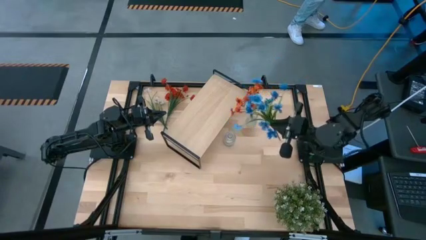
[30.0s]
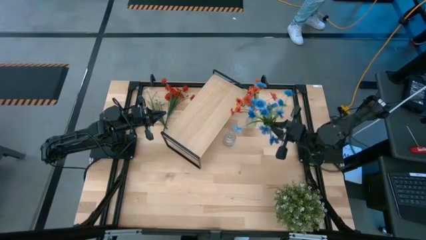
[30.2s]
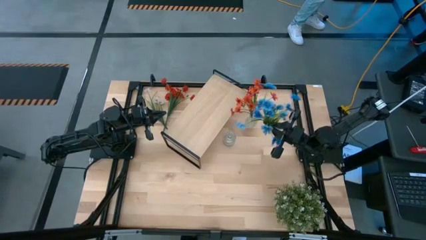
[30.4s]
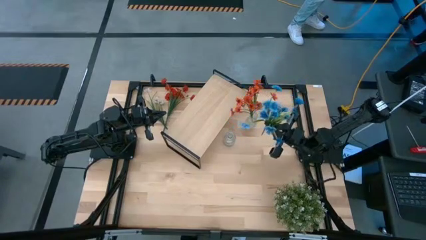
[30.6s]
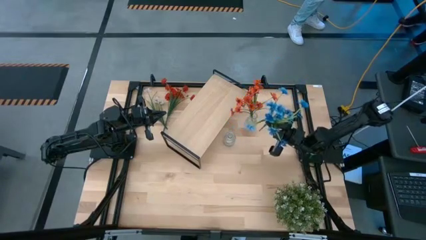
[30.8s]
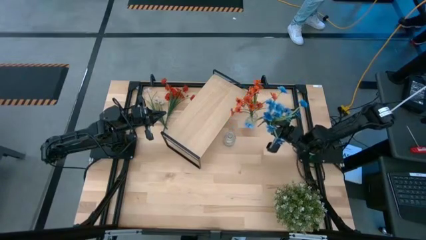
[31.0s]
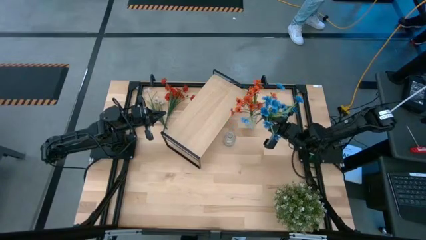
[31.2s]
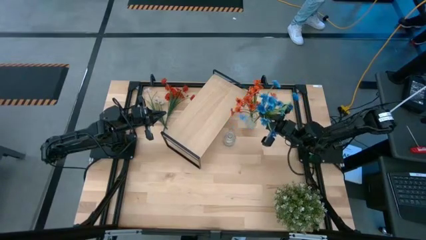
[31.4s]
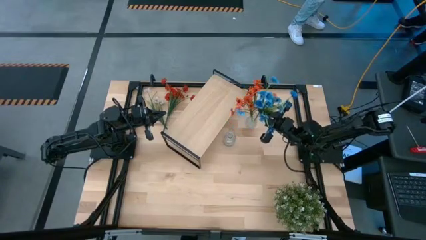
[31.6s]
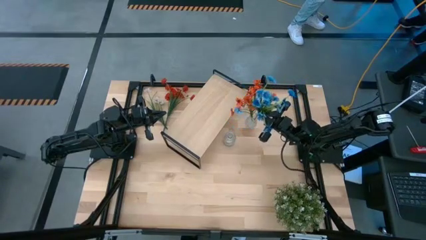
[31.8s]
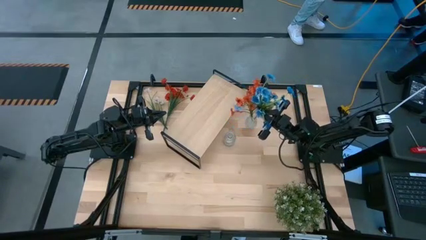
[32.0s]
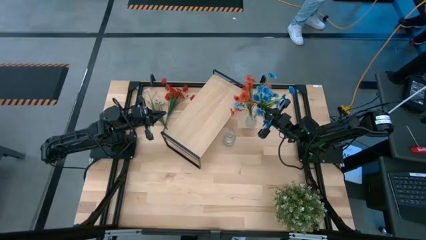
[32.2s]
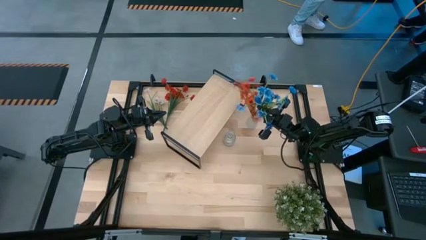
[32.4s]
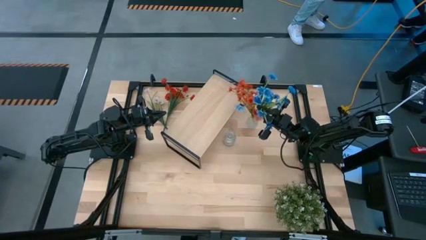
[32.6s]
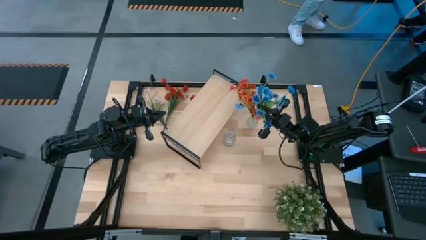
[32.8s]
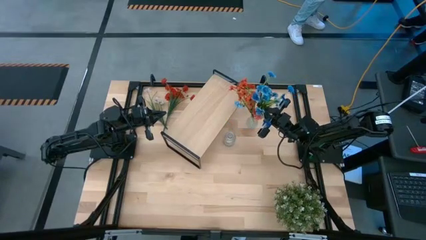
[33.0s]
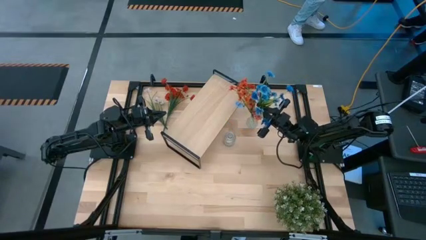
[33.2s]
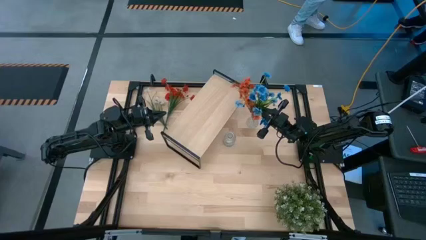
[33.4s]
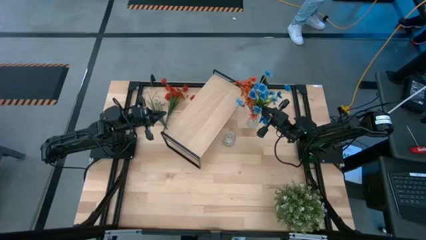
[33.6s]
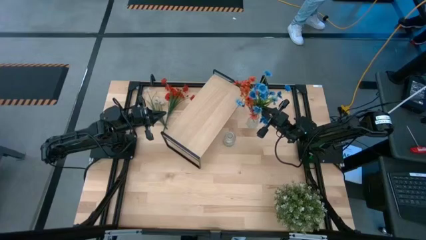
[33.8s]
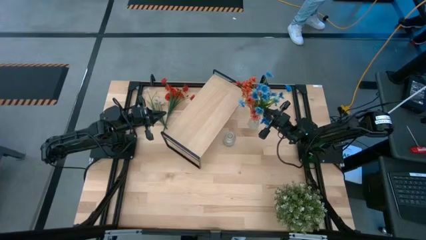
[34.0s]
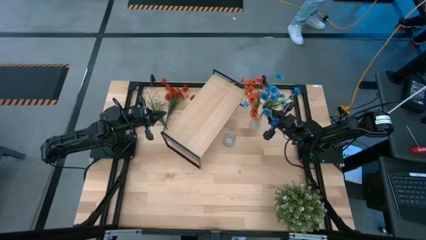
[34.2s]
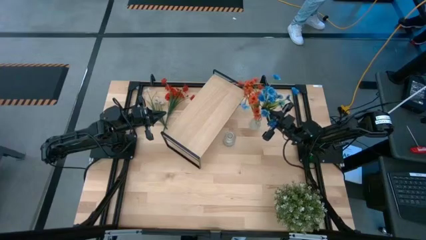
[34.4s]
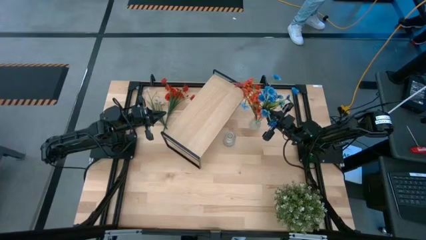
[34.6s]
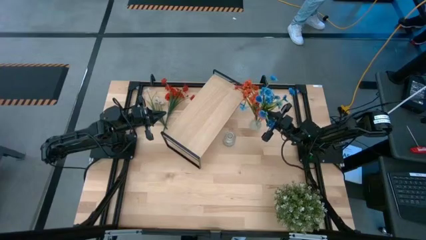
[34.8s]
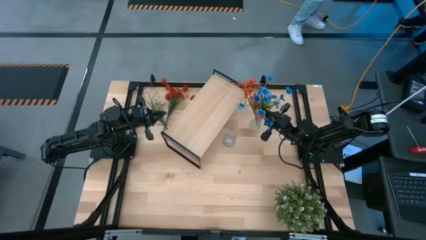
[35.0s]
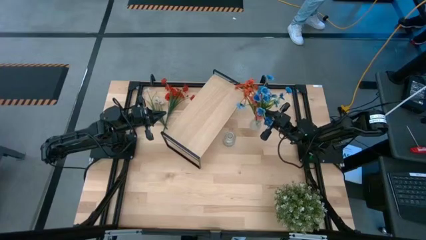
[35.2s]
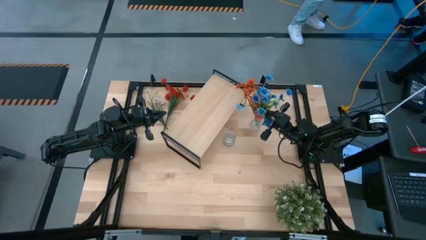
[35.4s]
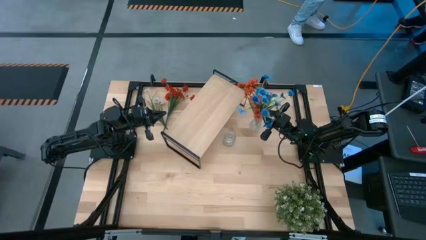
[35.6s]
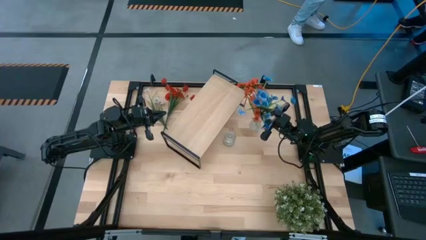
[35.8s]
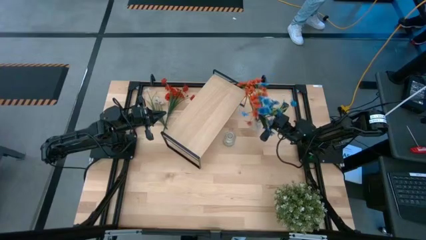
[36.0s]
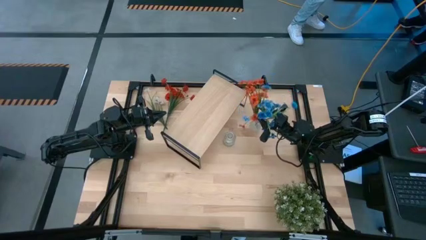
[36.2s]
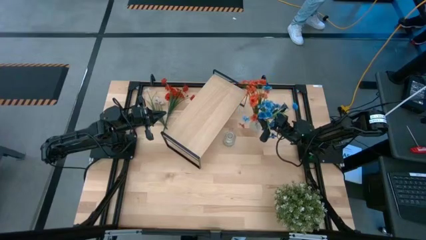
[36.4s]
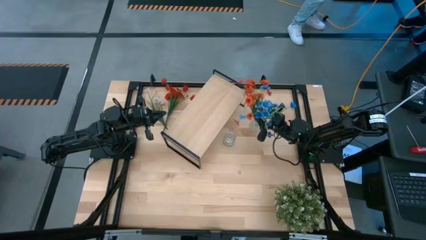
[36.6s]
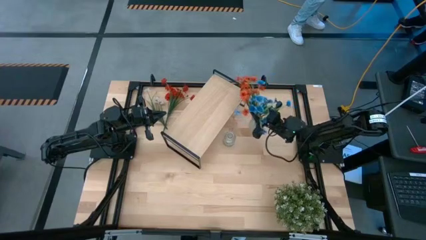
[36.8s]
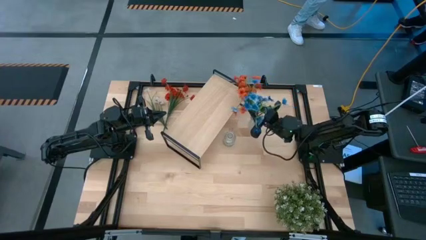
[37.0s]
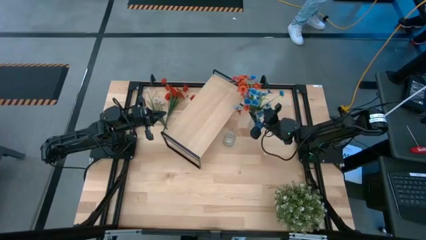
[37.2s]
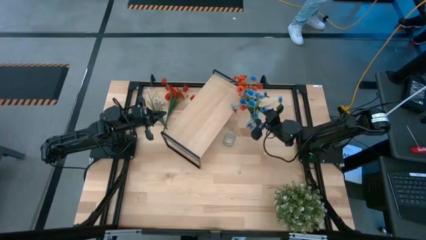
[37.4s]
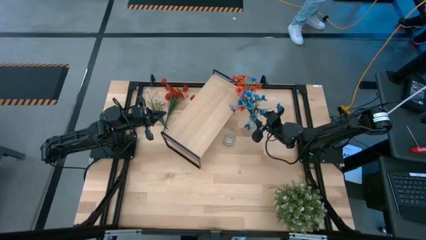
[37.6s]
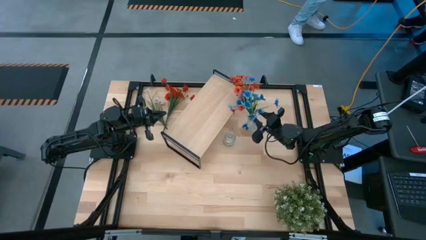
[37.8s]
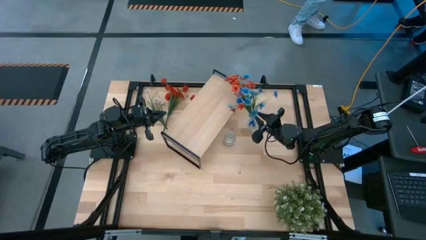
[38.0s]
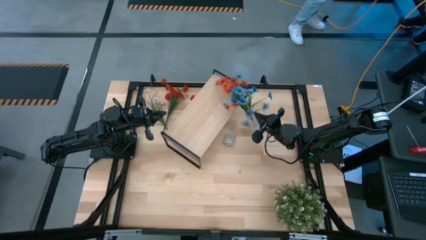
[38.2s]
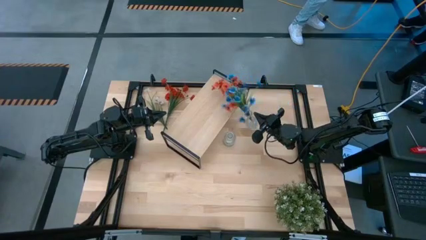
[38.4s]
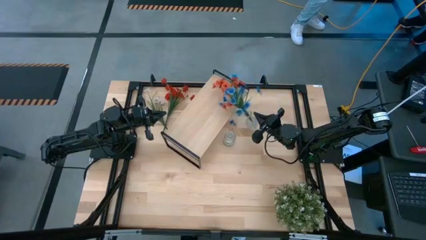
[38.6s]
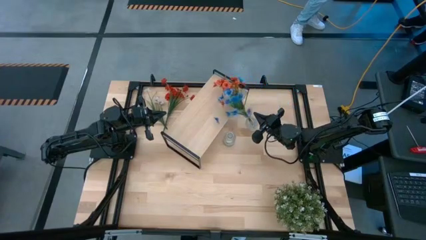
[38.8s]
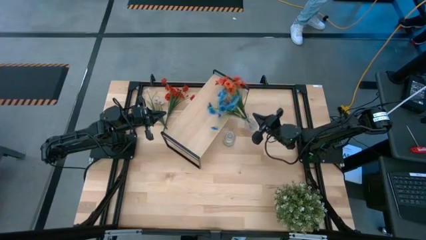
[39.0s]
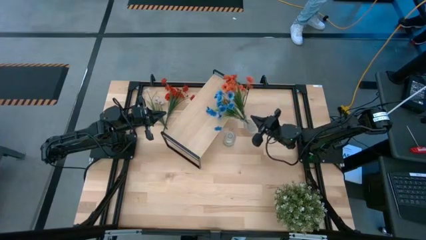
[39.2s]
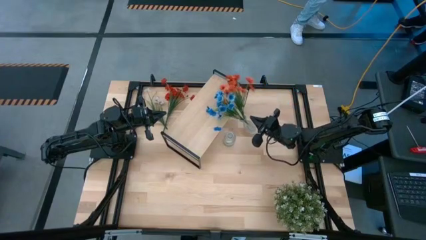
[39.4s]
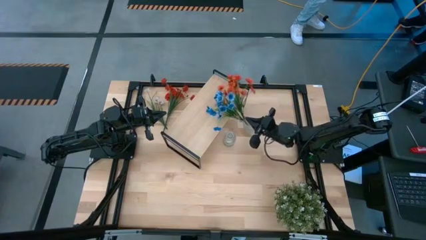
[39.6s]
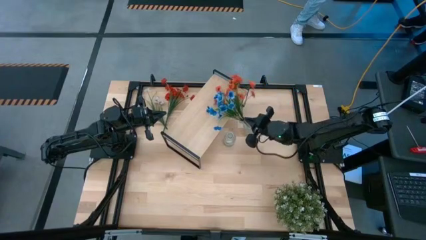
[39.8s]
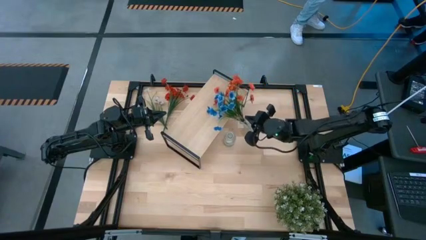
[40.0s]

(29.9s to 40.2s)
Task: Pick and place flowers into a vace then onto a shelf
Put the blue flowers into the right transparent vase

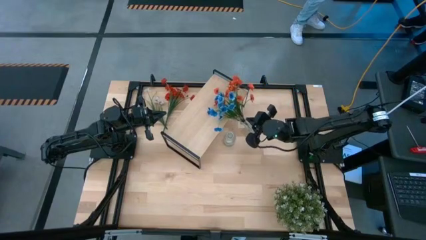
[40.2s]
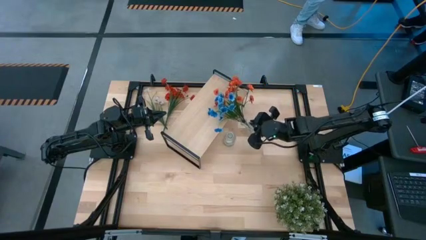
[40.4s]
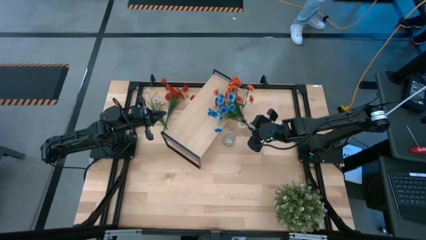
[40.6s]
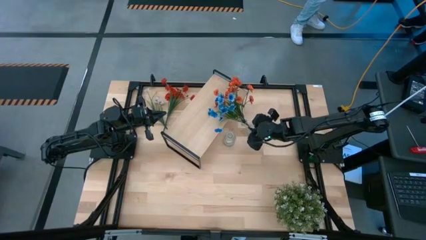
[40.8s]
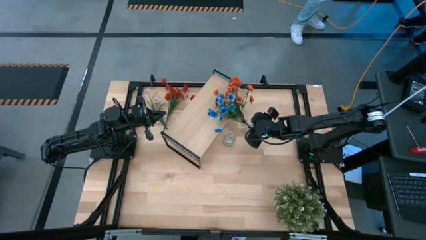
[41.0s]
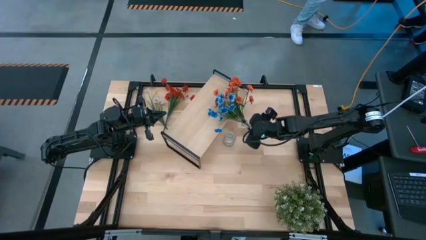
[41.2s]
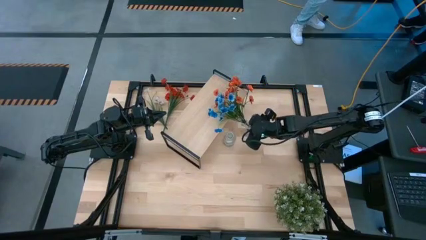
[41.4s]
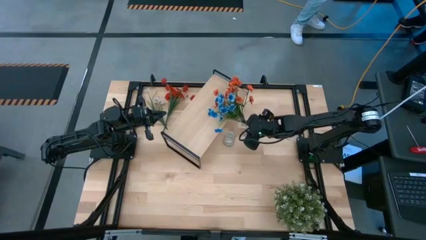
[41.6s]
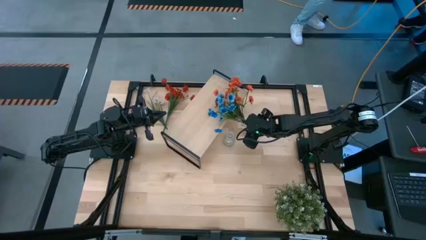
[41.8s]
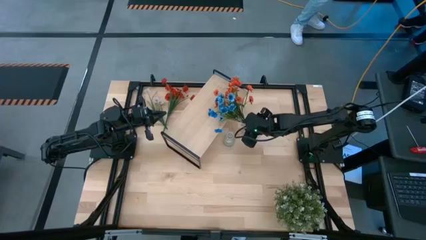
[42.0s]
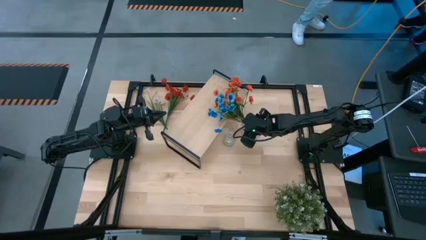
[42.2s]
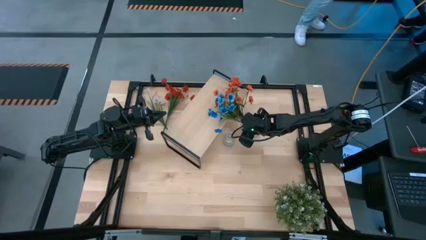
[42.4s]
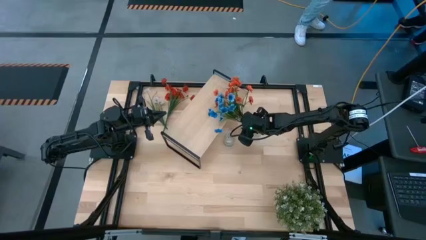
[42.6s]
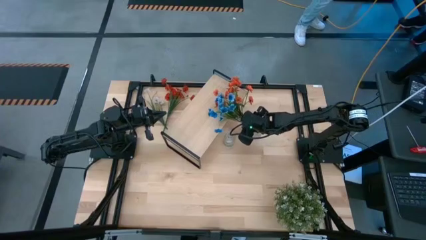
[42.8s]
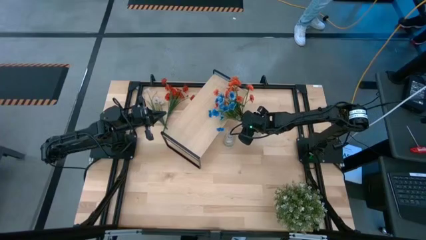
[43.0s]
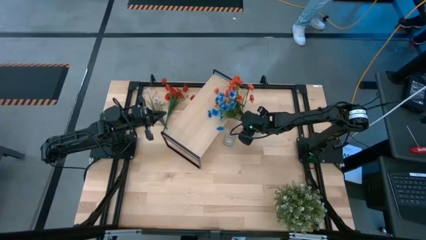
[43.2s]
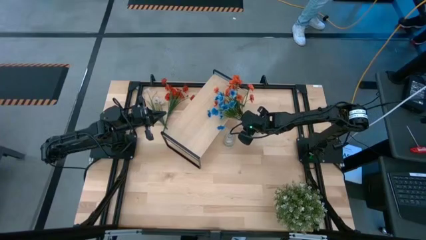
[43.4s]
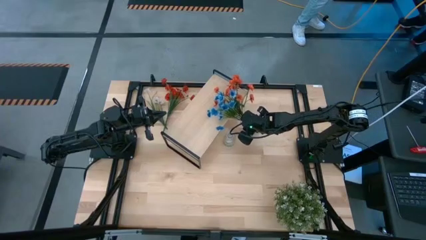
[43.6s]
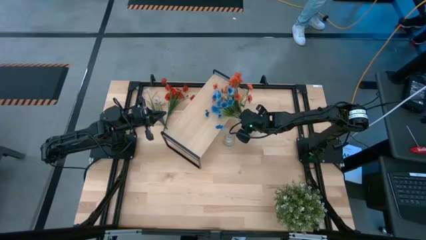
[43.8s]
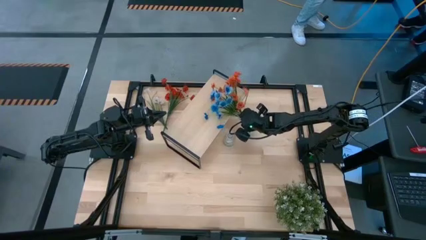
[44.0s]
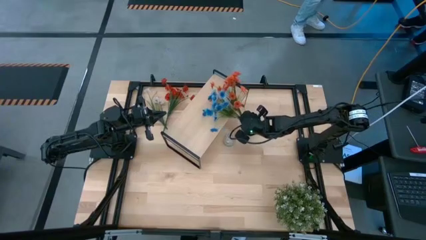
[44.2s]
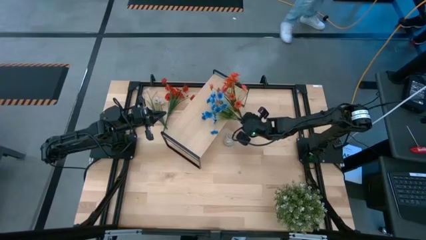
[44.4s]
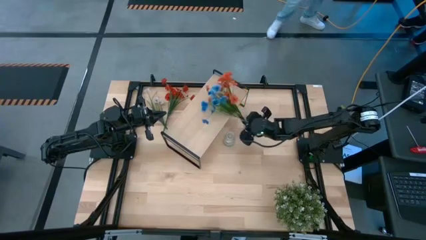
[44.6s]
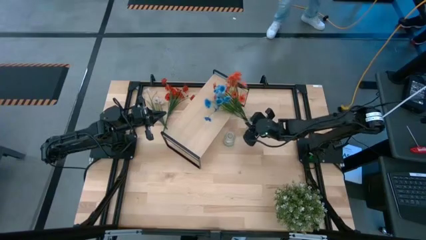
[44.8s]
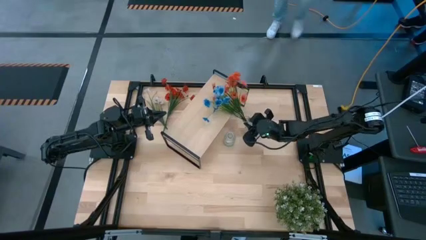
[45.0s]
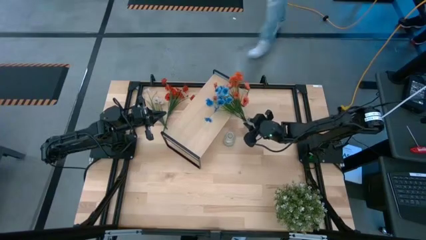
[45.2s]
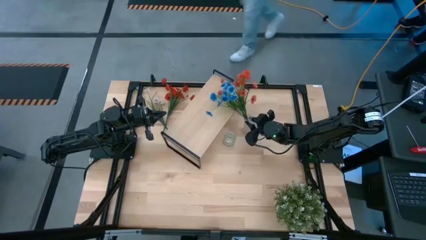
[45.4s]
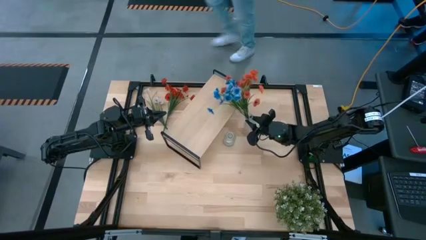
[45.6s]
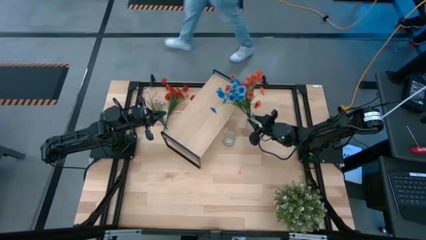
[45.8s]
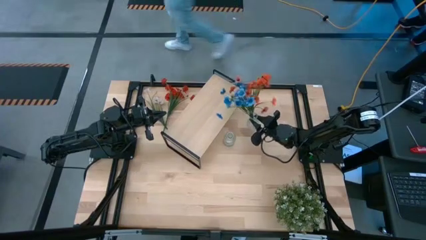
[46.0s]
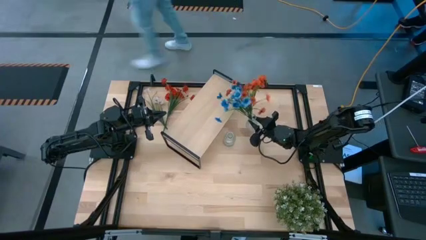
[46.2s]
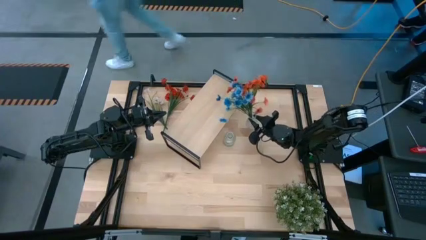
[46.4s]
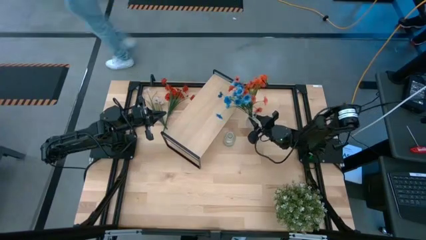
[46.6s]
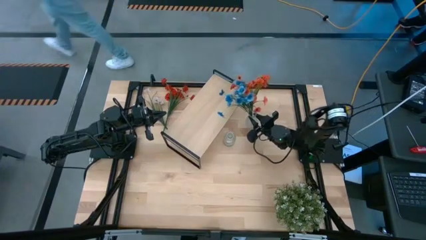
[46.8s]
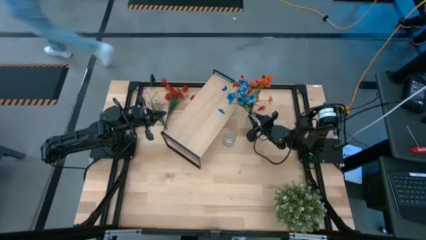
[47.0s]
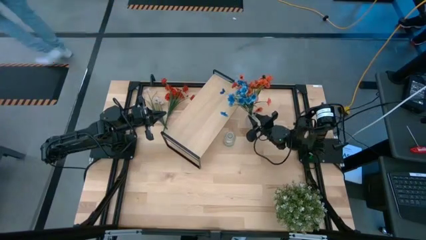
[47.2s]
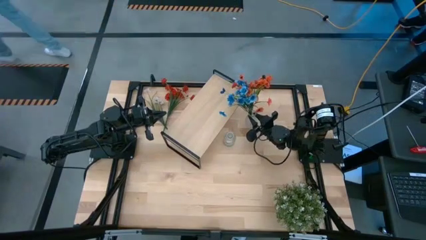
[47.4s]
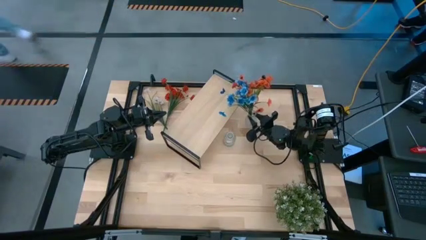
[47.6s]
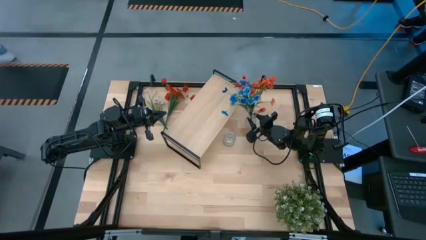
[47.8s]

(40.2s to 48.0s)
Adjust the right transparent vase
